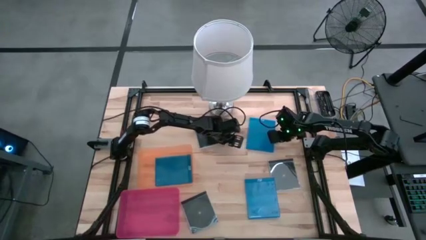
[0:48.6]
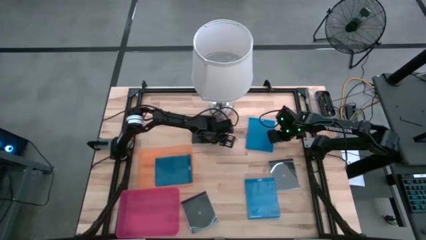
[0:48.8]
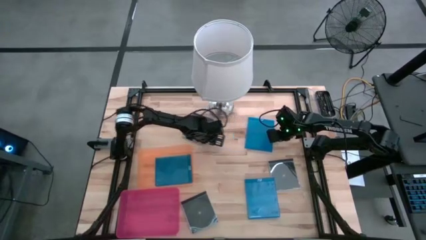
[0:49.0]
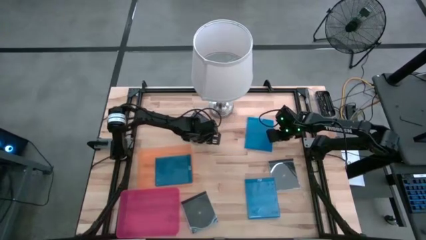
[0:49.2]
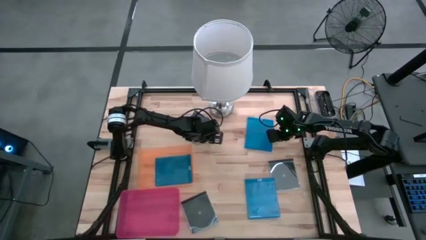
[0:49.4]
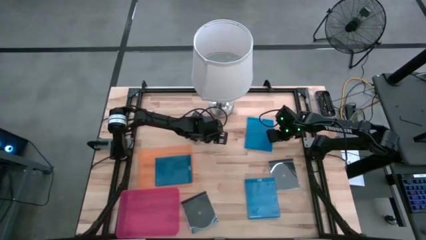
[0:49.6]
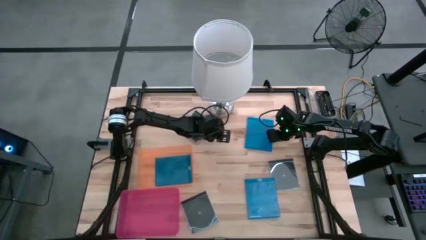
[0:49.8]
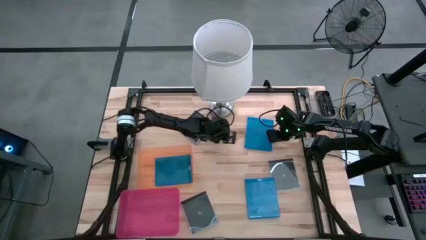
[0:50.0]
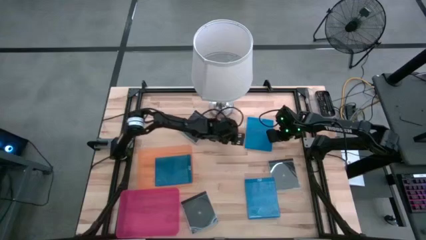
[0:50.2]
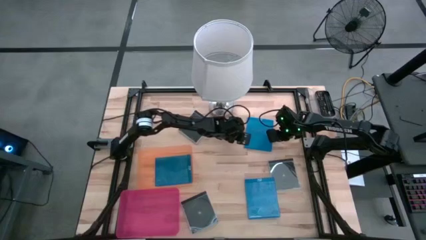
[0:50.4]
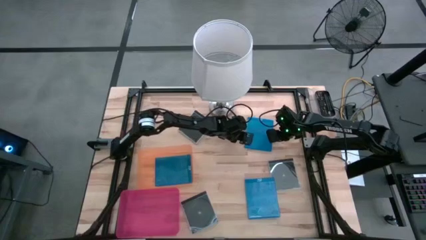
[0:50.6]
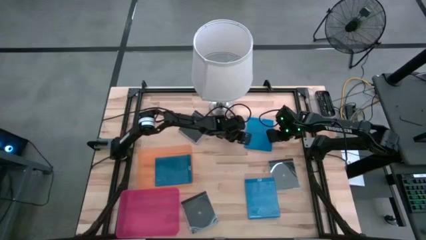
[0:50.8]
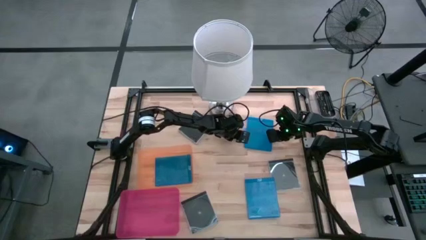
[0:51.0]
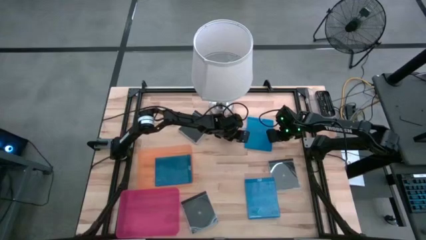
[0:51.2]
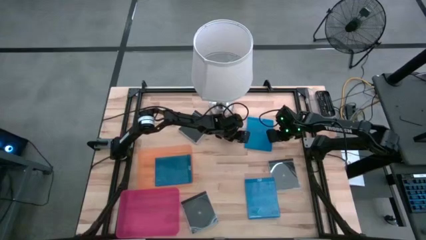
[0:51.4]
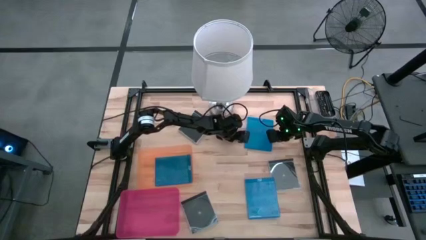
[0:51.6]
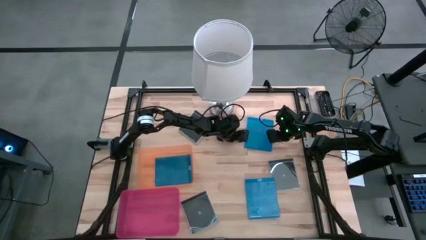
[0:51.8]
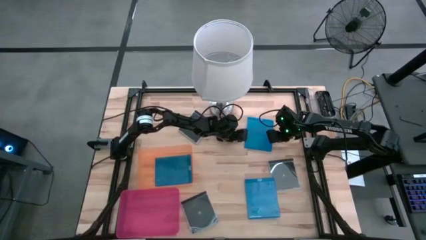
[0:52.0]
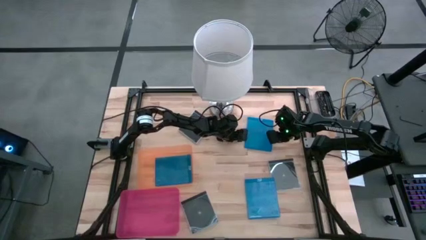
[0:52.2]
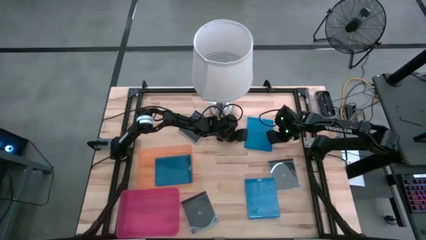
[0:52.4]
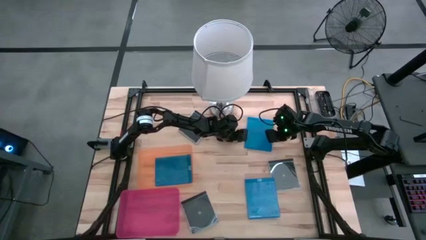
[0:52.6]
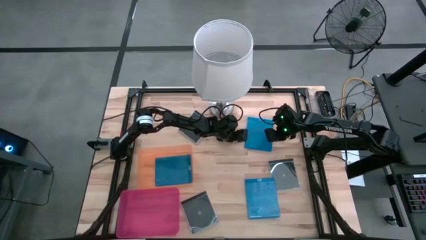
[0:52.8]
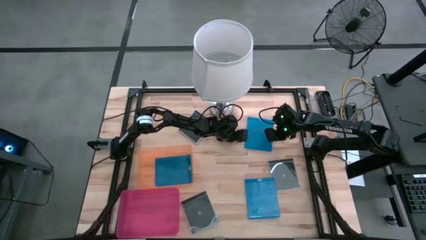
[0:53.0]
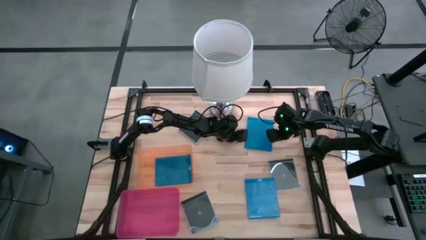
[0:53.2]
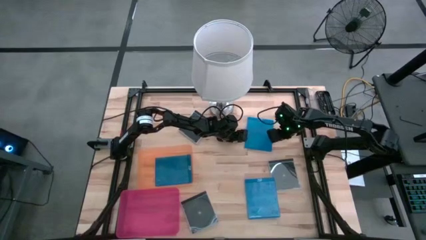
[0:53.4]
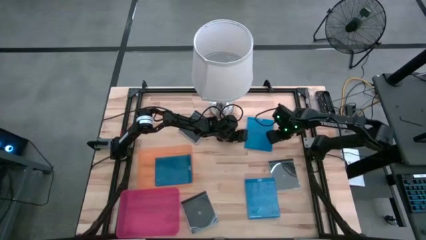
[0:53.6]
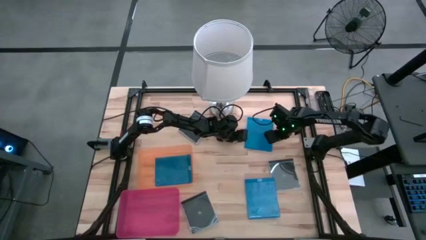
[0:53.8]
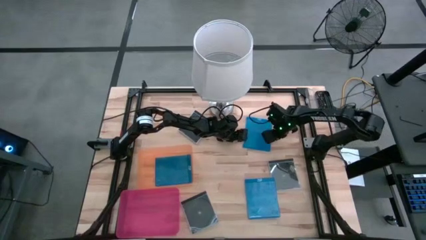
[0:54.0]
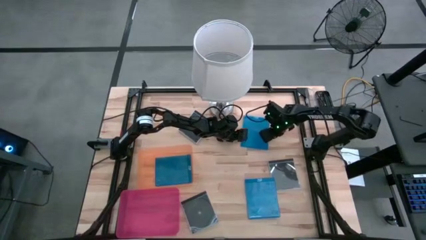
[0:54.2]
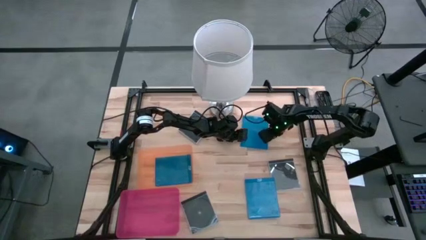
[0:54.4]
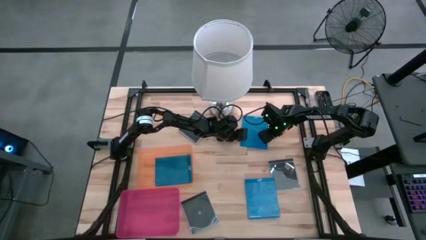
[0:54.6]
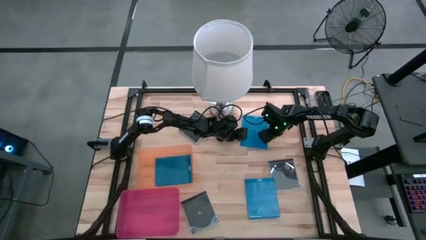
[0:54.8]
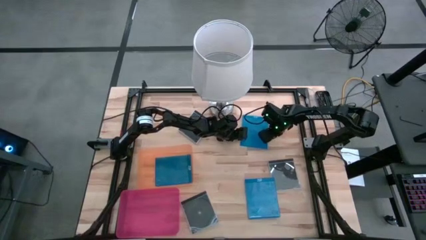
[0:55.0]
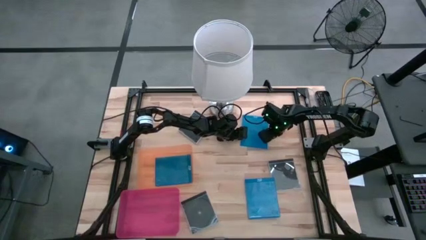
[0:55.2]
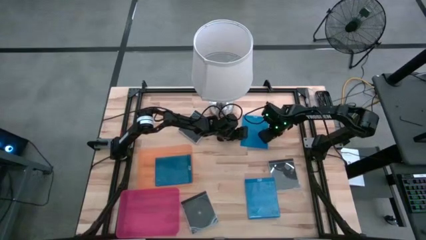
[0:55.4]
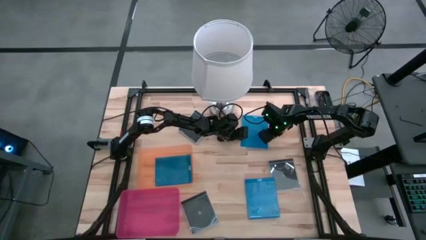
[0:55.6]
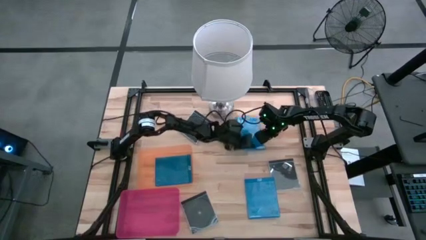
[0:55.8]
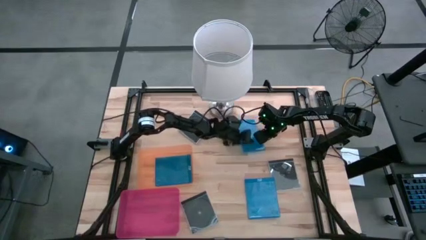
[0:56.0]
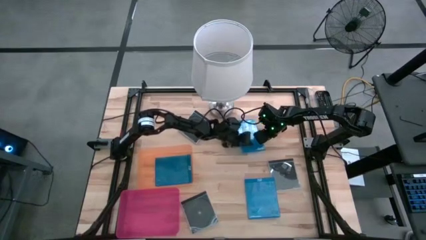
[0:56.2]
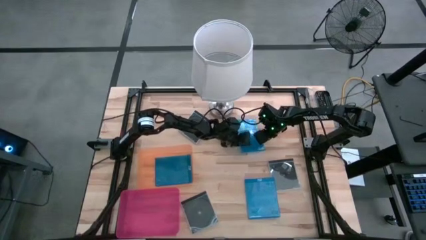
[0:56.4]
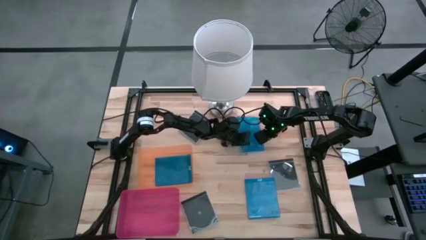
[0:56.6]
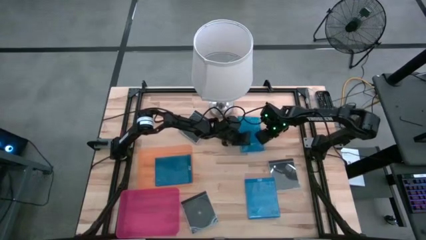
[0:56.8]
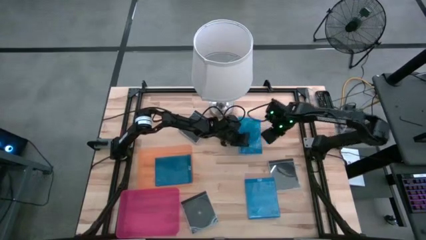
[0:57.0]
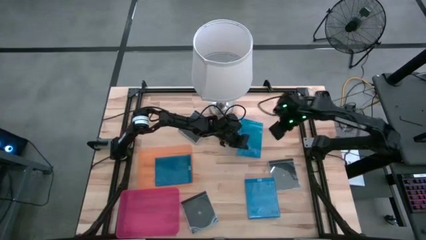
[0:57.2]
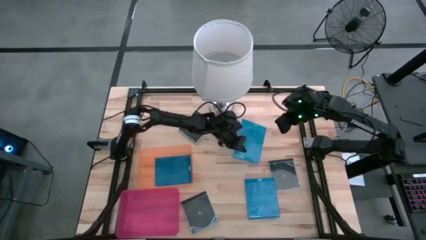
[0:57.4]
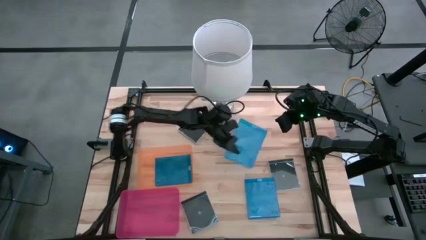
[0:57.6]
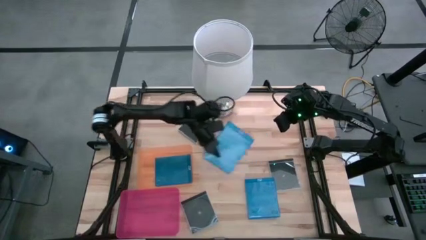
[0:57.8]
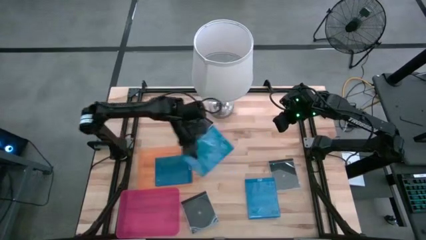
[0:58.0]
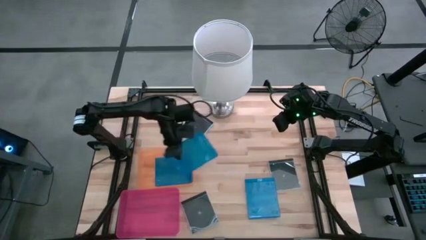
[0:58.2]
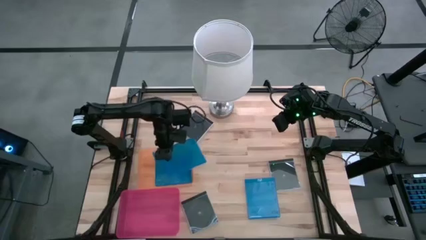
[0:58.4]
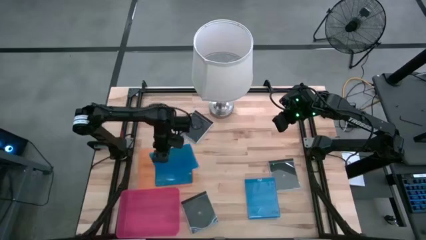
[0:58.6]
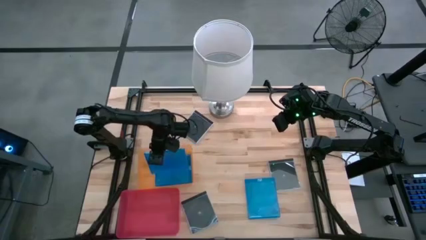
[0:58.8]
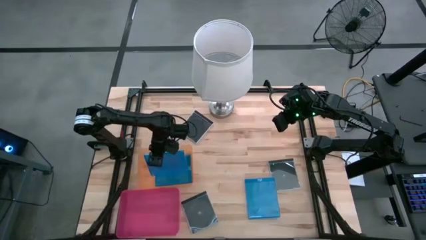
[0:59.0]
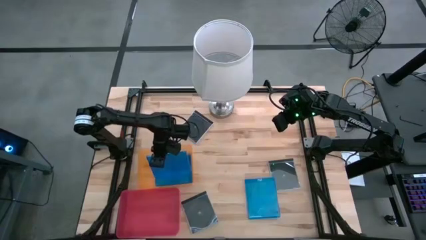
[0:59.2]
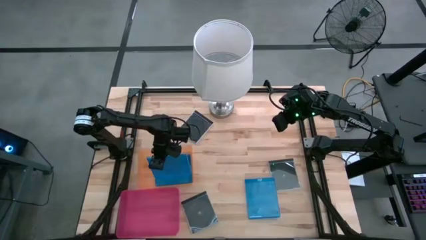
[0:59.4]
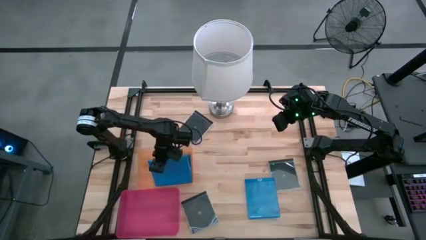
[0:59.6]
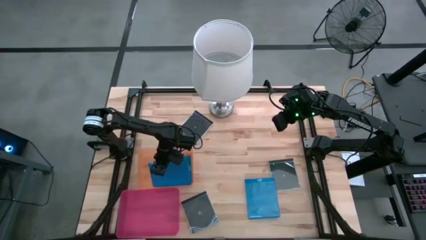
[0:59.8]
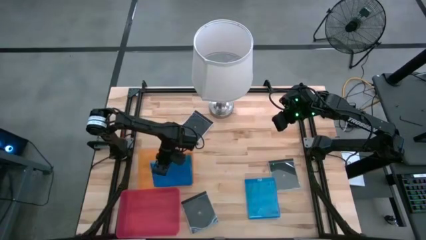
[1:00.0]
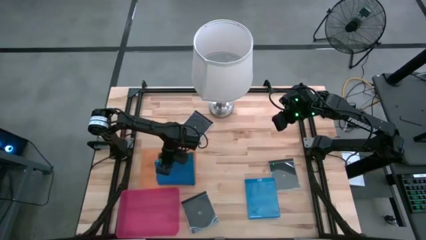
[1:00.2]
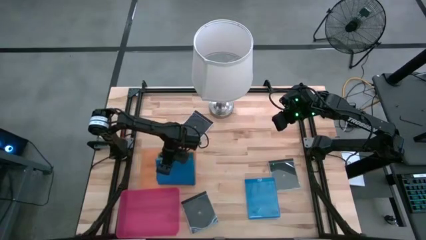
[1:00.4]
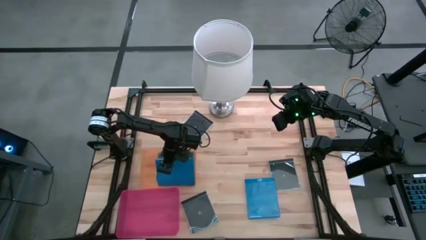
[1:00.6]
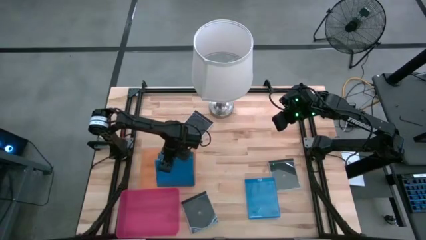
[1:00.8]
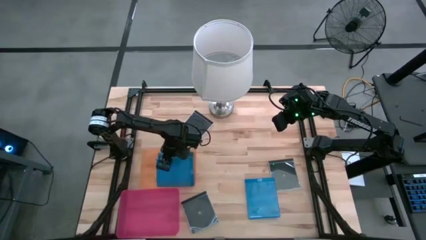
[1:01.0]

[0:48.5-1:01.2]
Task: Pick & place jewel cases by type
Put the top blue cd case into the orange bin

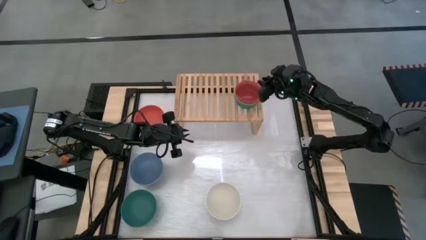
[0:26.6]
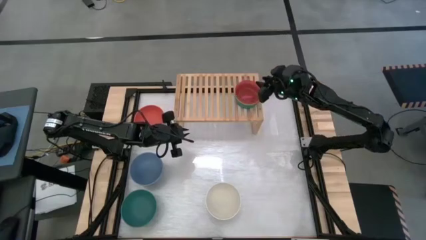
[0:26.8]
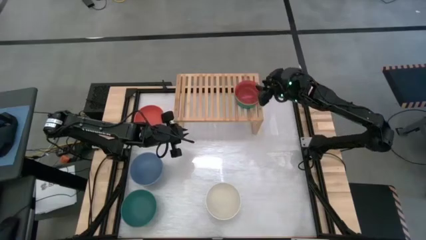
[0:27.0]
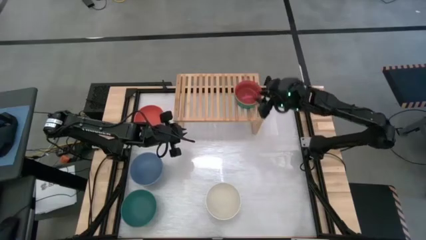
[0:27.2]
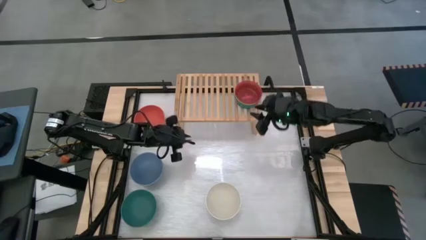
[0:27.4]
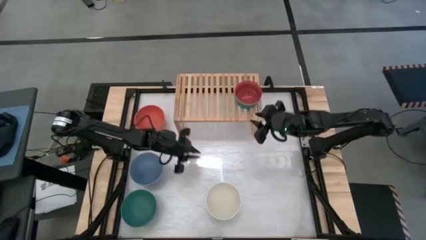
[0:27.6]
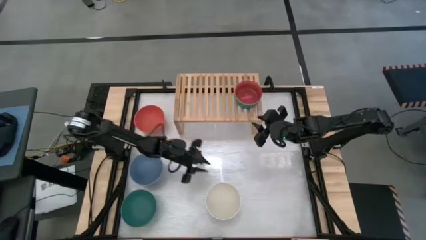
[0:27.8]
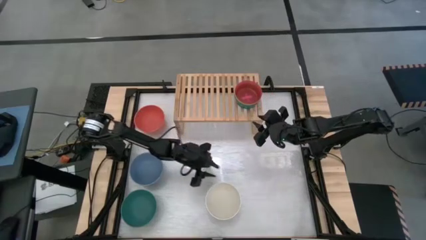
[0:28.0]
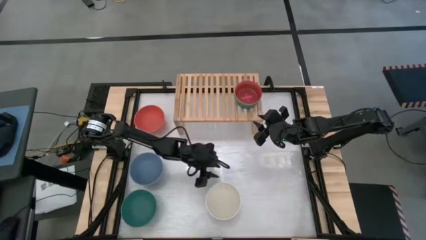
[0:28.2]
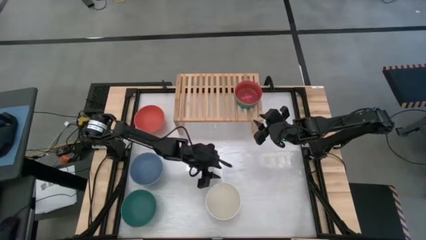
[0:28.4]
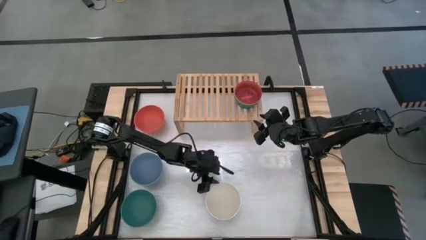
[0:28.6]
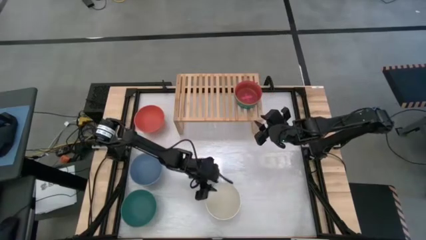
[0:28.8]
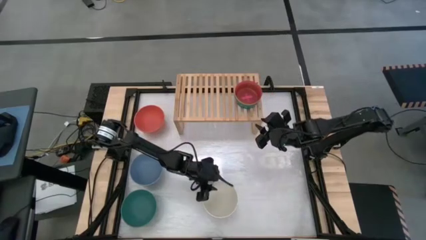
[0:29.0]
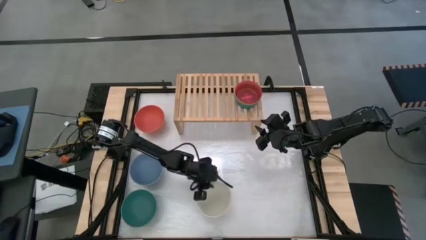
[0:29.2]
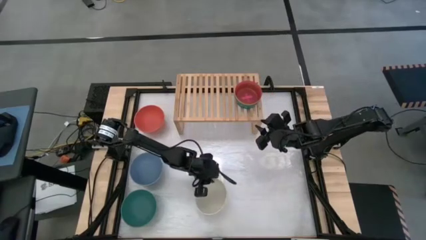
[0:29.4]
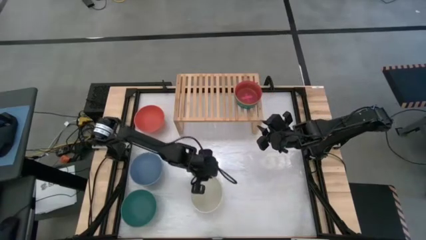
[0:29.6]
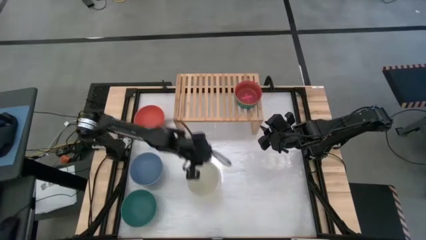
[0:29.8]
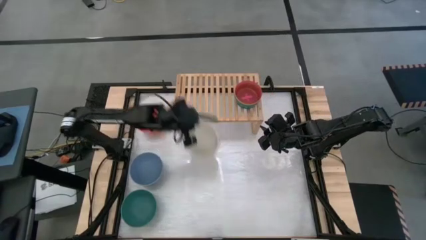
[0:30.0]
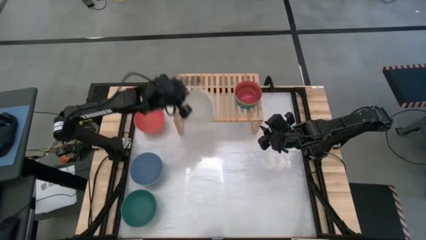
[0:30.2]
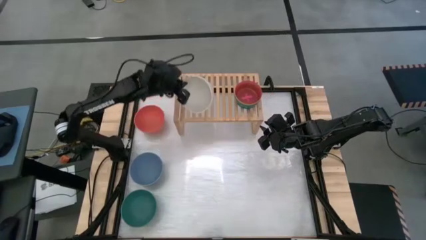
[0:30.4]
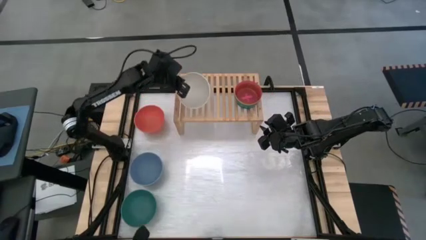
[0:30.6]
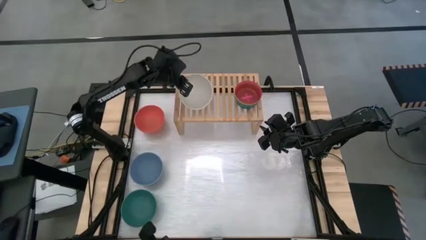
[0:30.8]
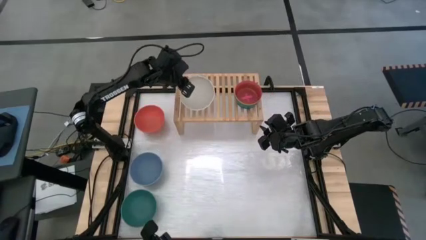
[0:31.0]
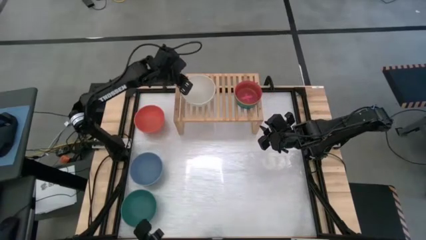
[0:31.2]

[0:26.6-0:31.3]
Task: Place and stack bowls onto a shelf
Put the white bowl on the shelf
